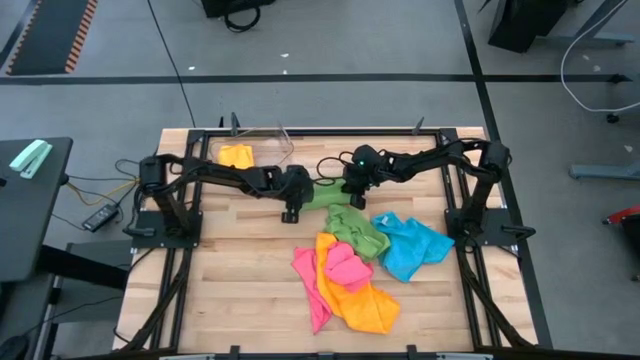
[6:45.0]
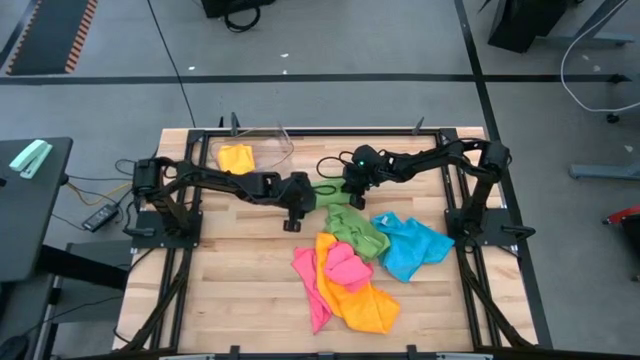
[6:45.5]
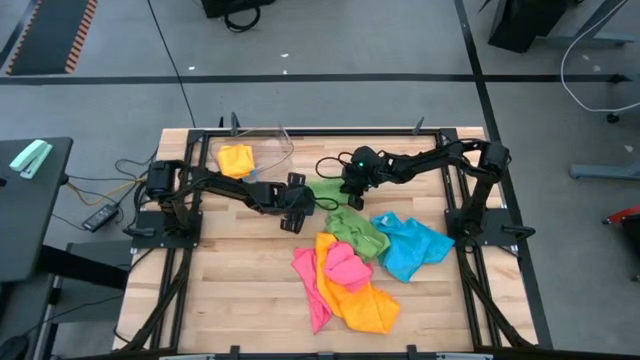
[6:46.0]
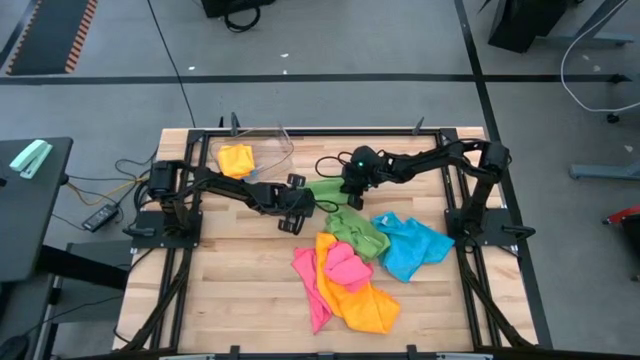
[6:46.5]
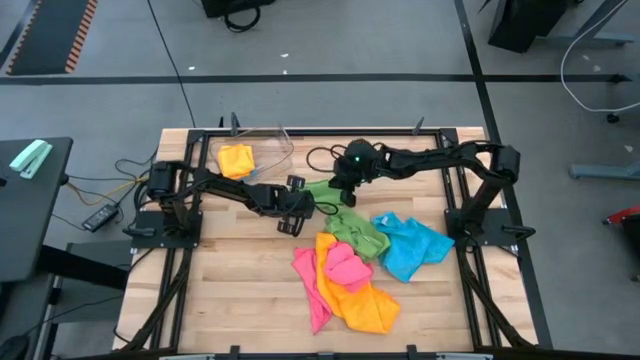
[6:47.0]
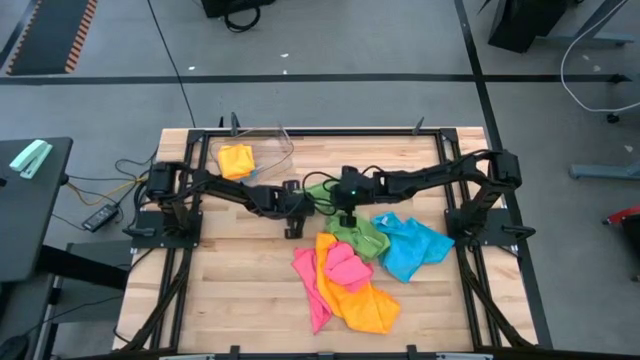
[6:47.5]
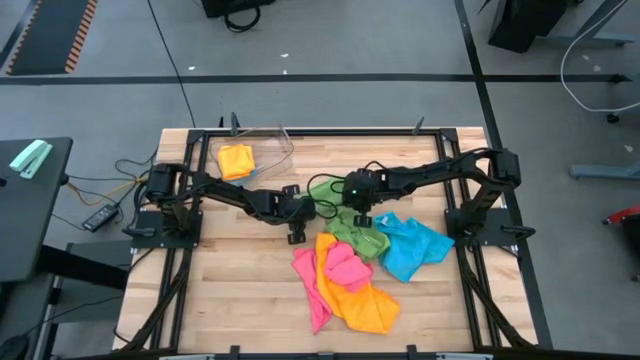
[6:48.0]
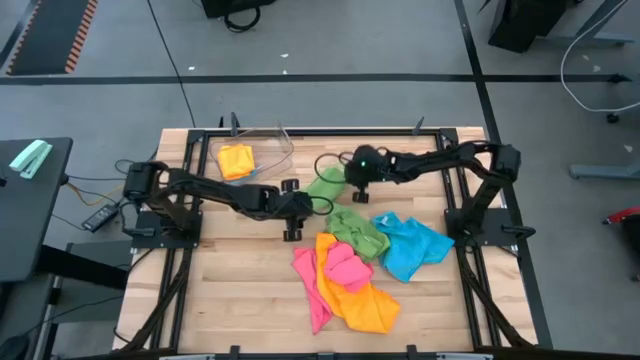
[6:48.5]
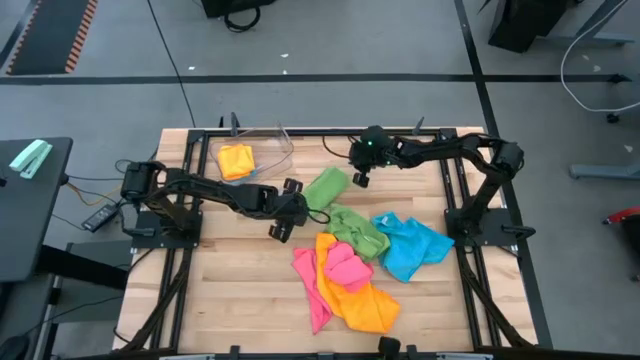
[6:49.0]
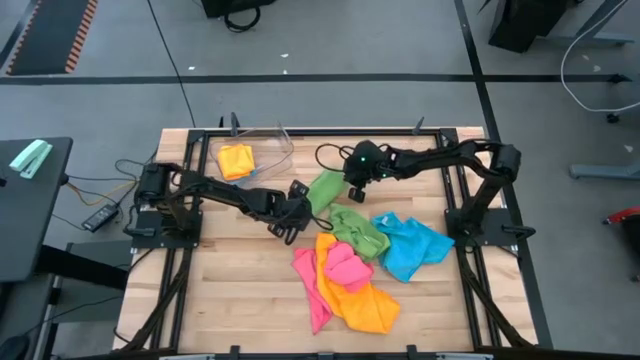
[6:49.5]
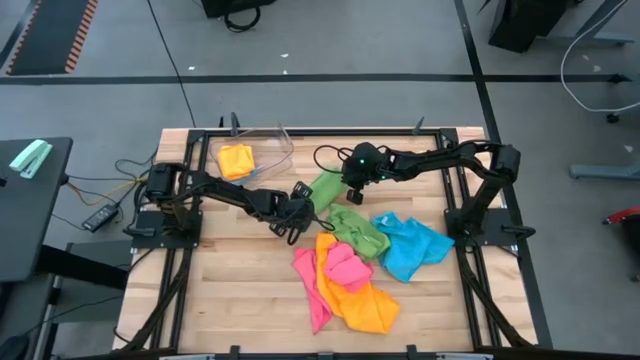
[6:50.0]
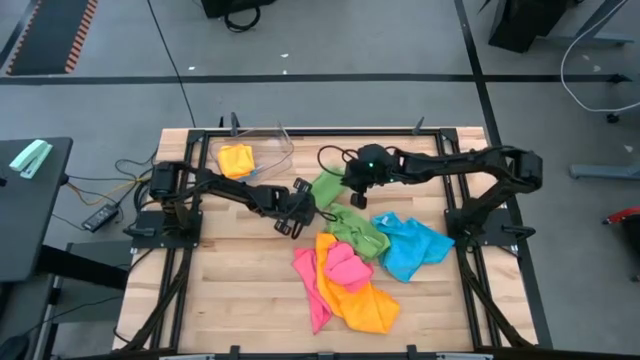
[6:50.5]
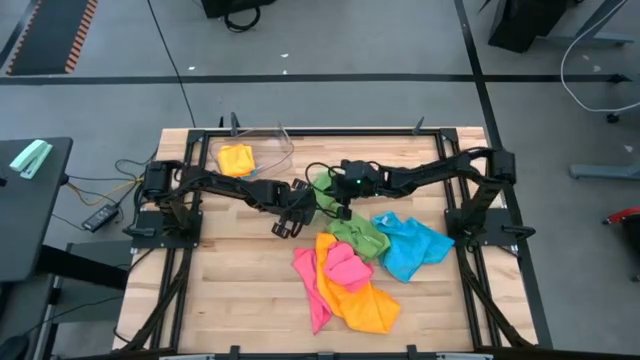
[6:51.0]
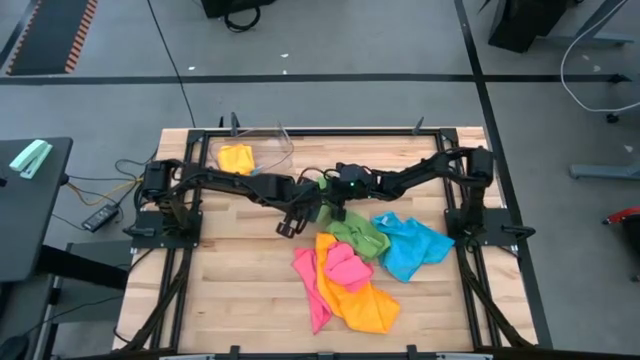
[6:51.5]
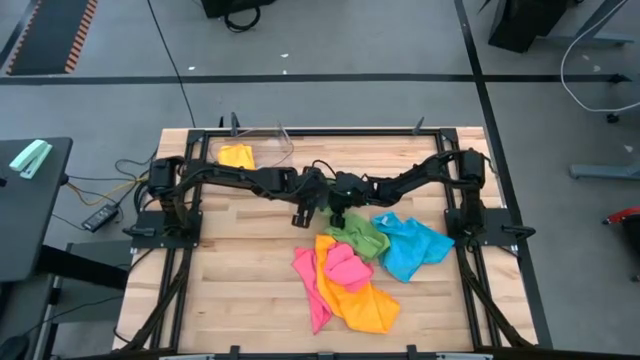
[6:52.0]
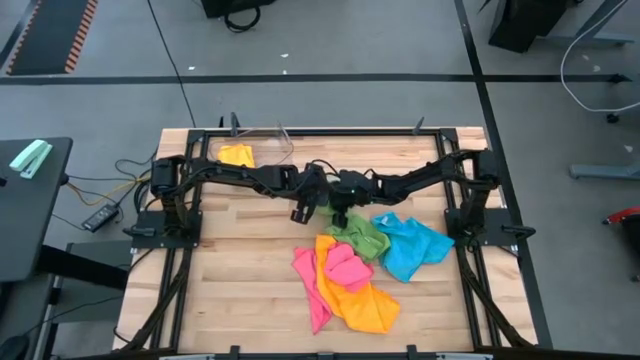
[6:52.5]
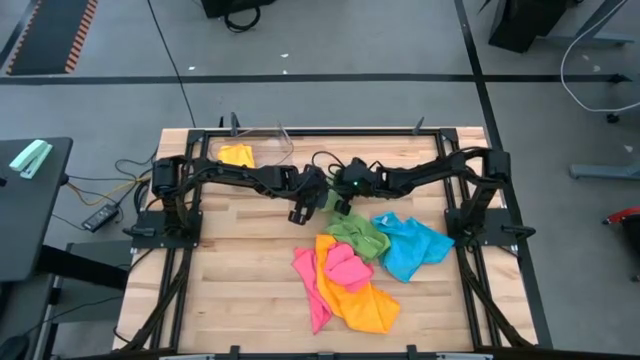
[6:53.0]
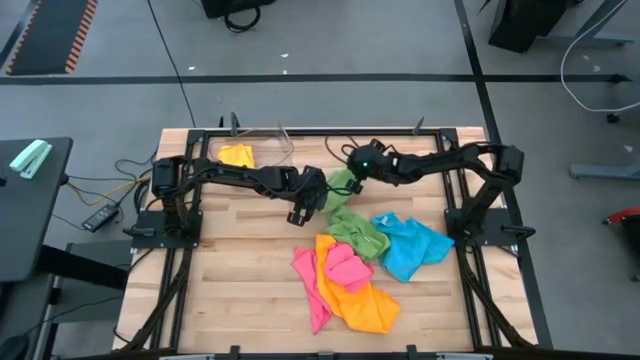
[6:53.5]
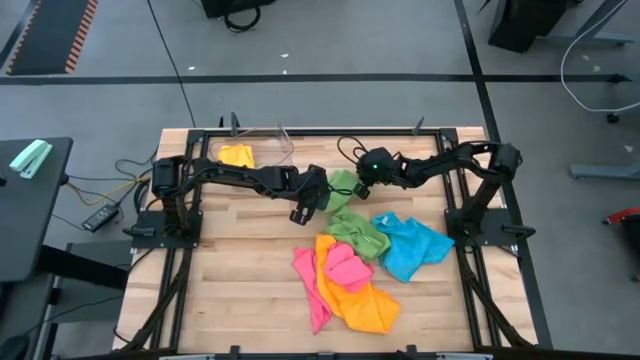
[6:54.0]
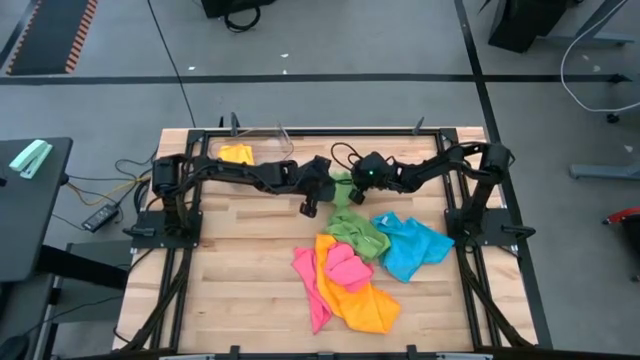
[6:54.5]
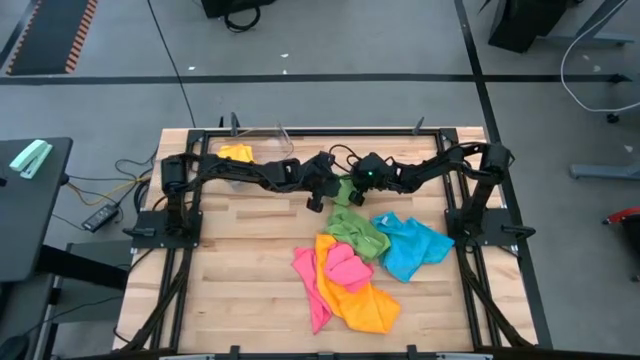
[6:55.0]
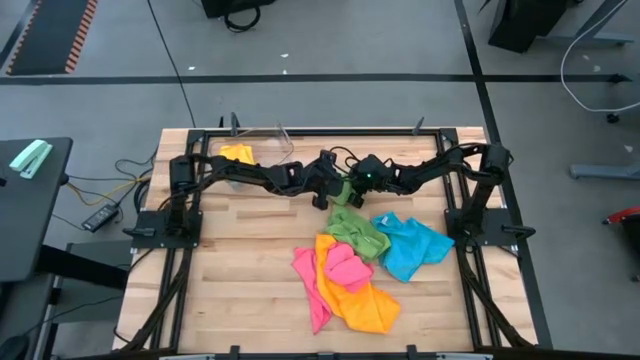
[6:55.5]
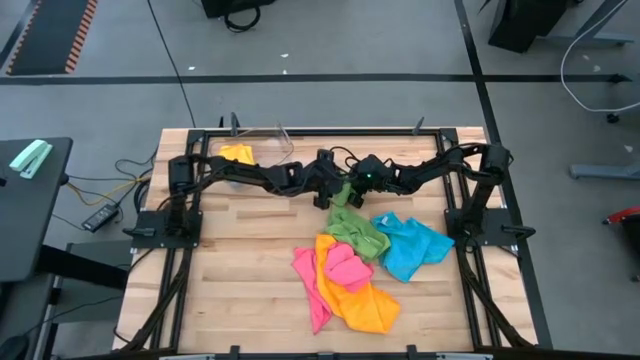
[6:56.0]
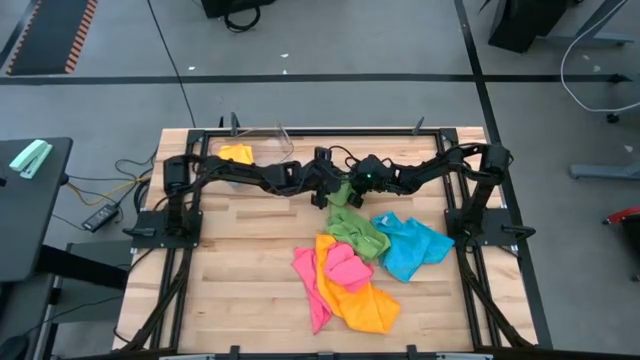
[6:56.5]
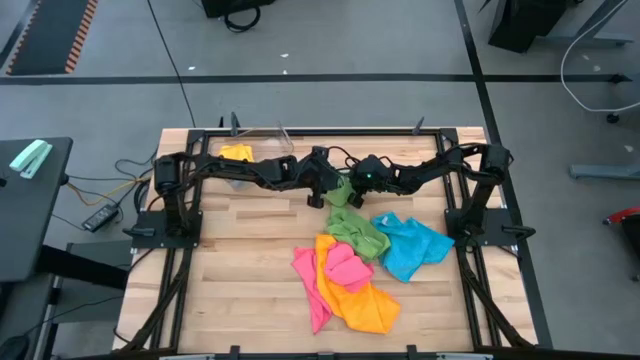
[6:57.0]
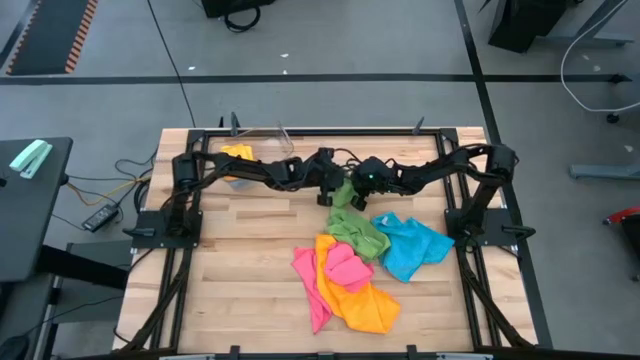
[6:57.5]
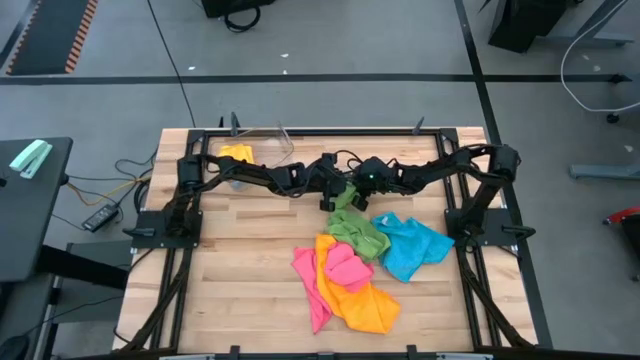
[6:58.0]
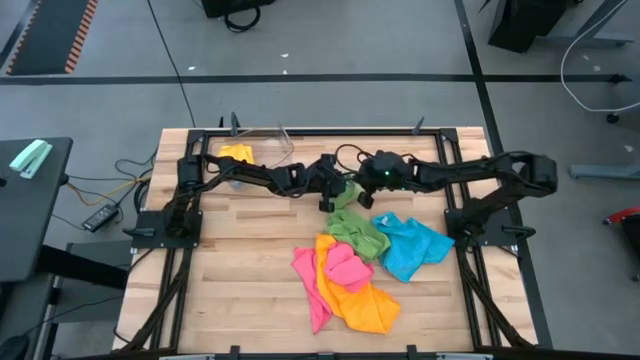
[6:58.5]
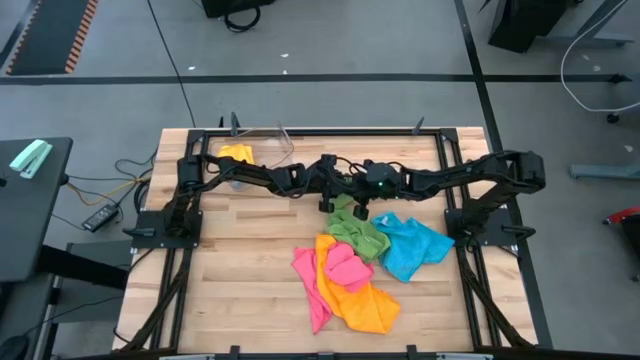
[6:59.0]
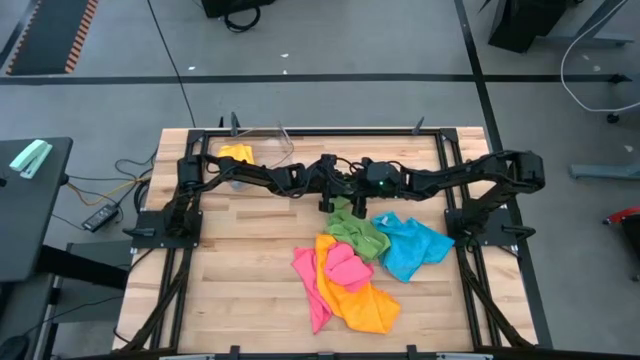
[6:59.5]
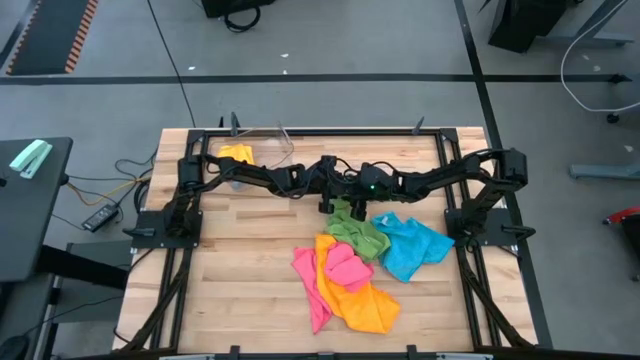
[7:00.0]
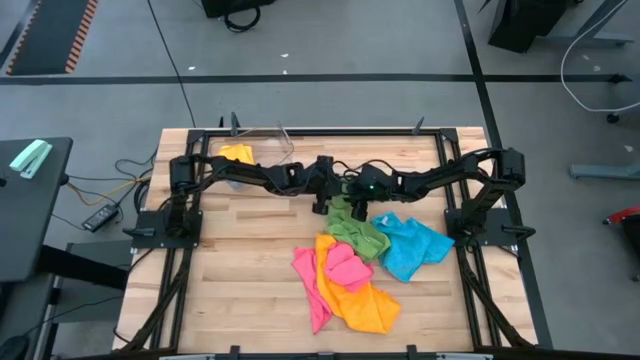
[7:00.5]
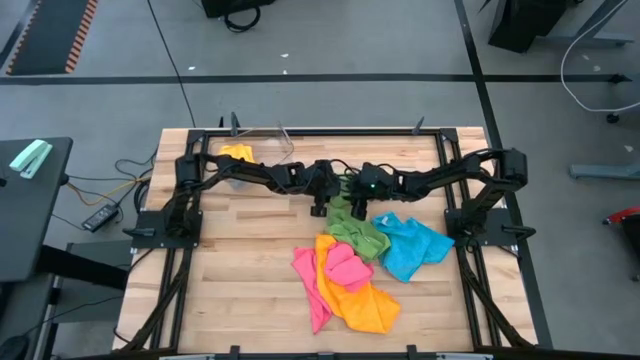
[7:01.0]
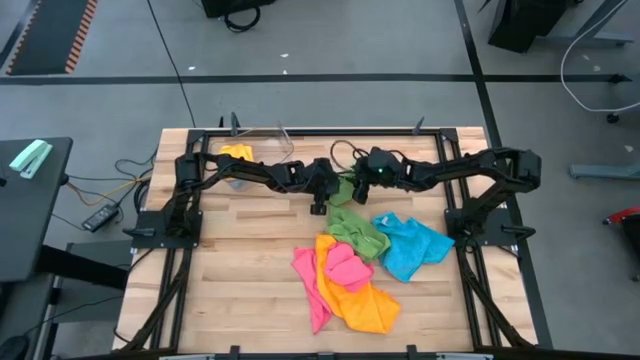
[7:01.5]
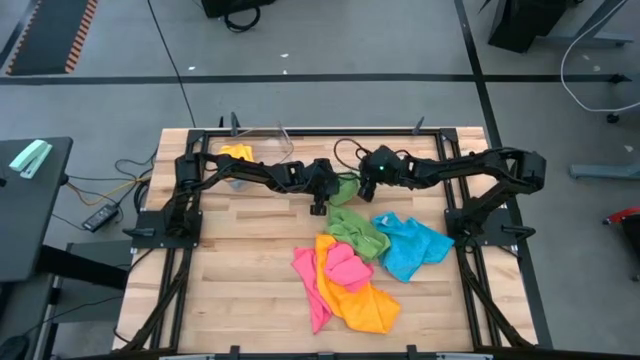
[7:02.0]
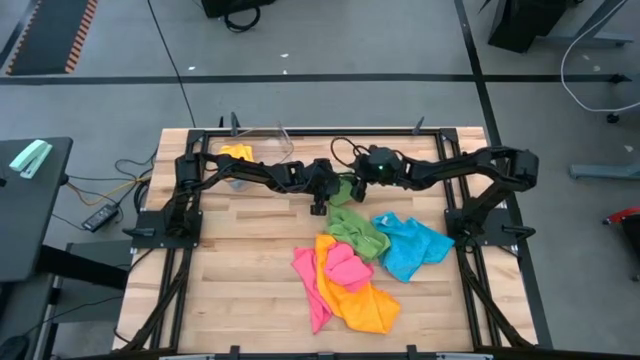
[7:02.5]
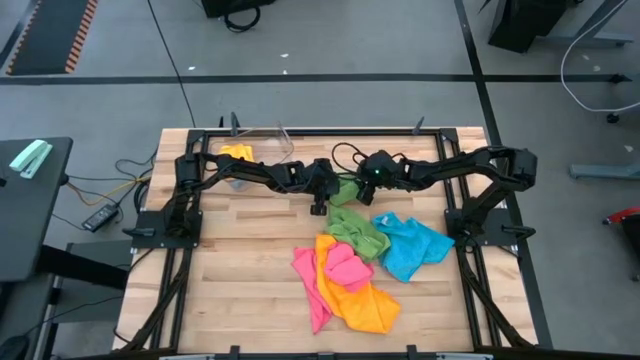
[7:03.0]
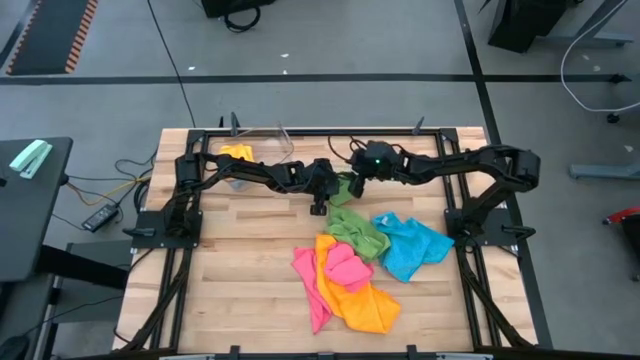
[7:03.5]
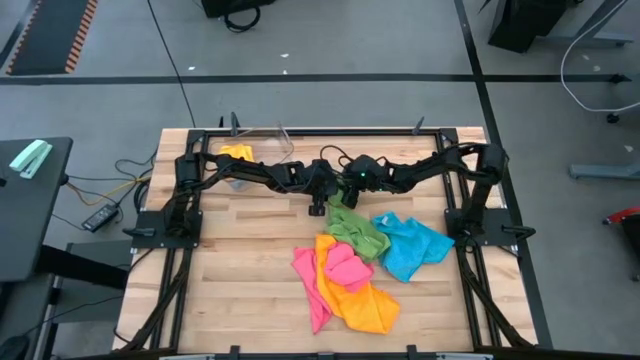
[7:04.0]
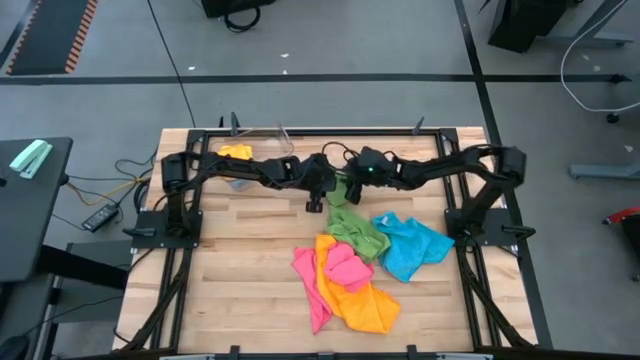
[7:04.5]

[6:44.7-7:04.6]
Task: Fold microfiber towels
Fold the left green microfiber towel
